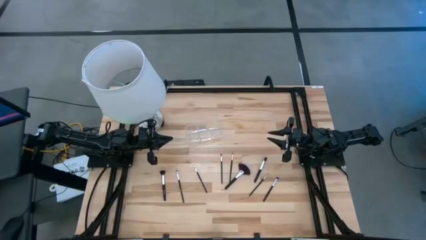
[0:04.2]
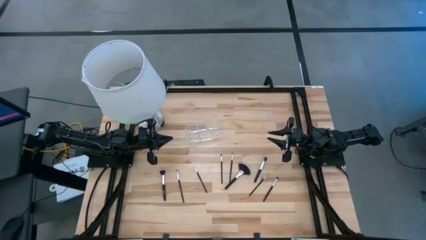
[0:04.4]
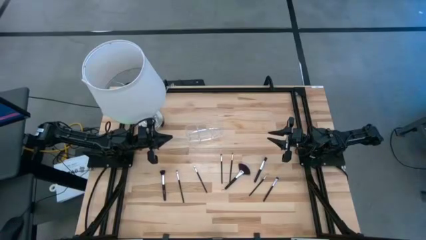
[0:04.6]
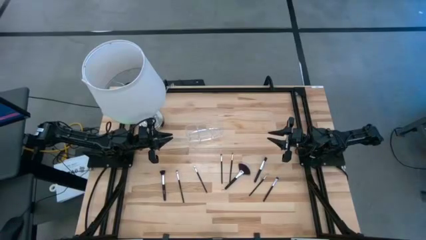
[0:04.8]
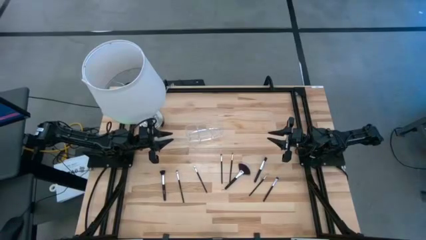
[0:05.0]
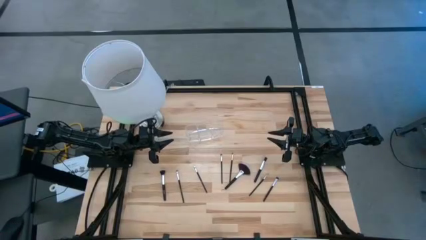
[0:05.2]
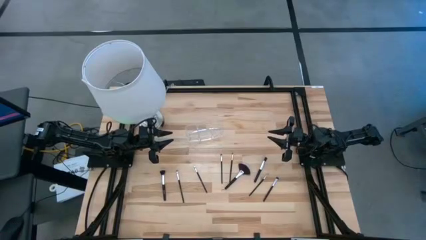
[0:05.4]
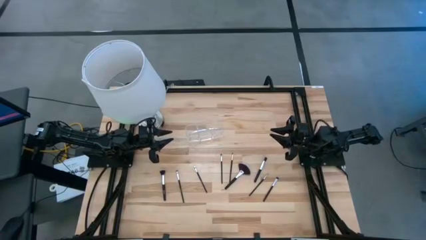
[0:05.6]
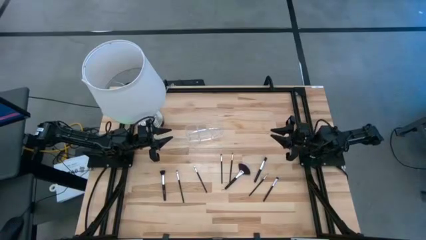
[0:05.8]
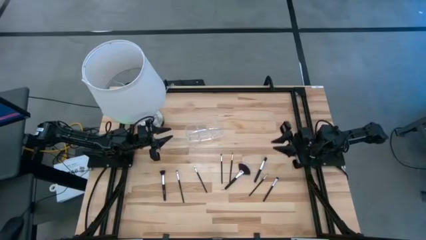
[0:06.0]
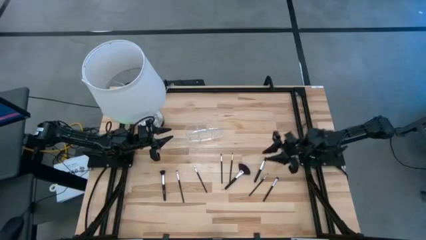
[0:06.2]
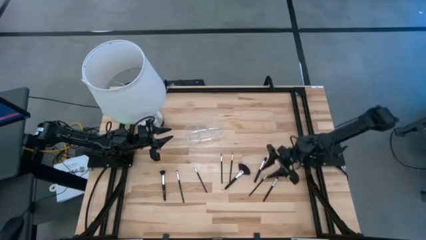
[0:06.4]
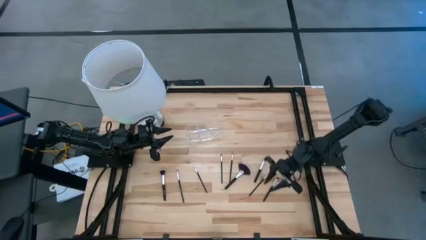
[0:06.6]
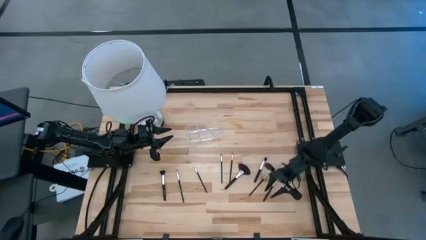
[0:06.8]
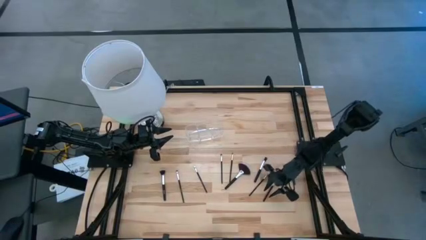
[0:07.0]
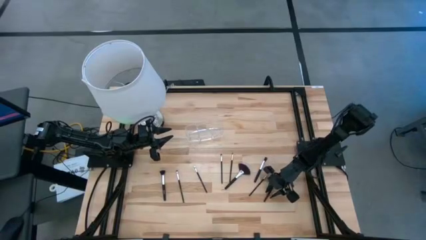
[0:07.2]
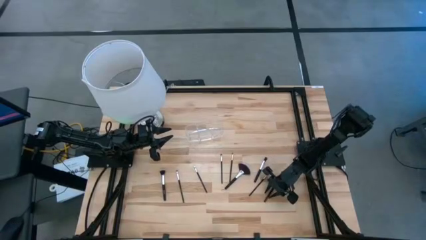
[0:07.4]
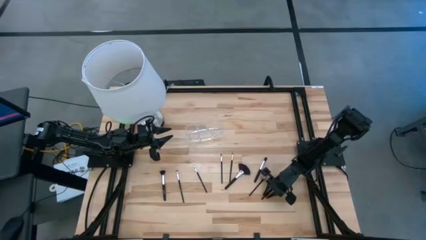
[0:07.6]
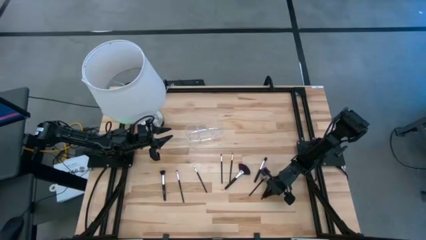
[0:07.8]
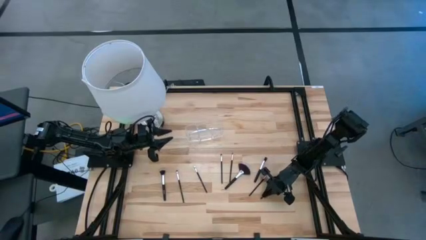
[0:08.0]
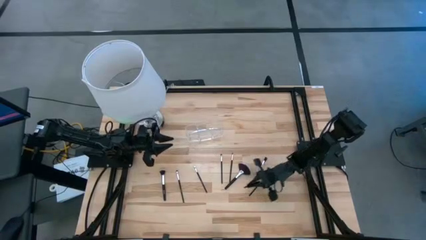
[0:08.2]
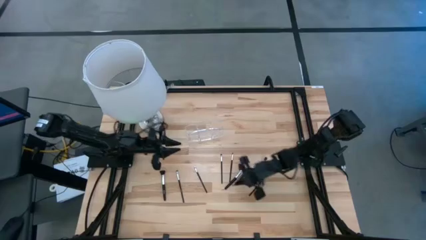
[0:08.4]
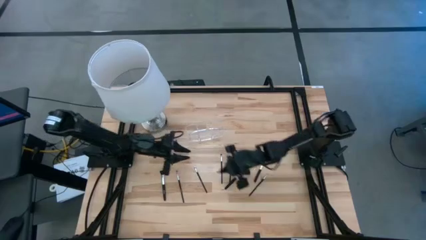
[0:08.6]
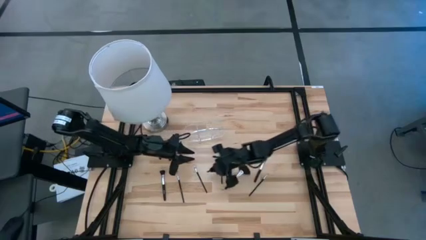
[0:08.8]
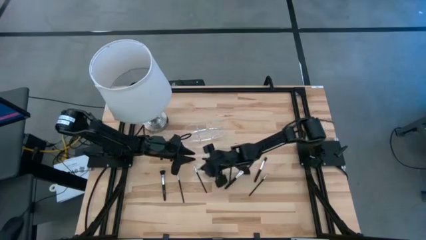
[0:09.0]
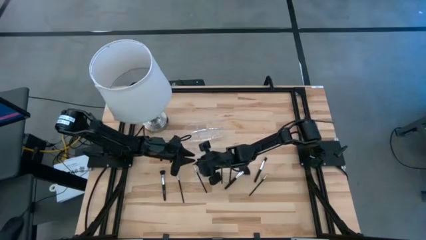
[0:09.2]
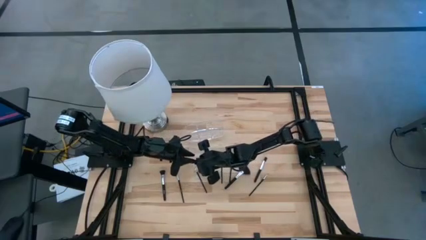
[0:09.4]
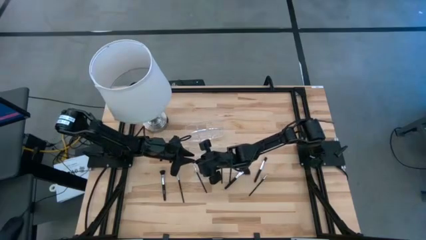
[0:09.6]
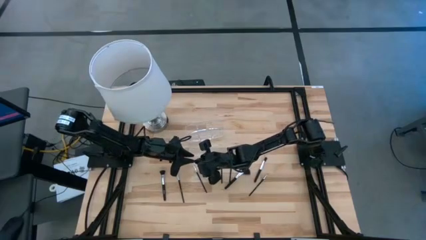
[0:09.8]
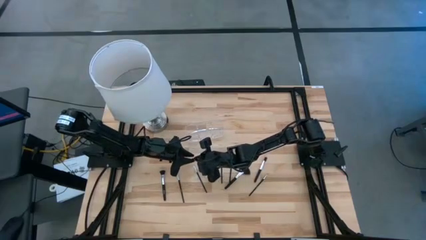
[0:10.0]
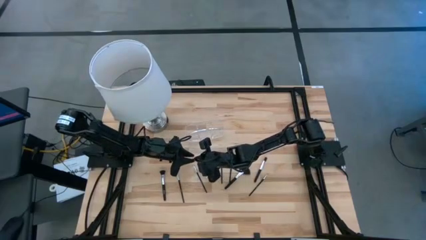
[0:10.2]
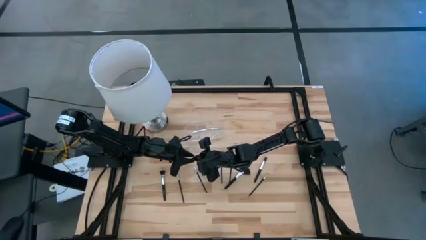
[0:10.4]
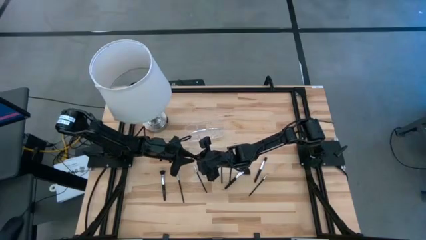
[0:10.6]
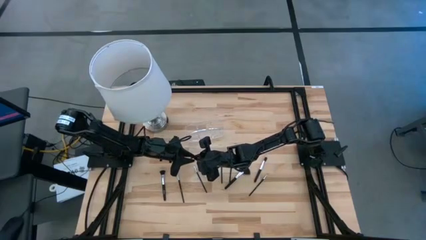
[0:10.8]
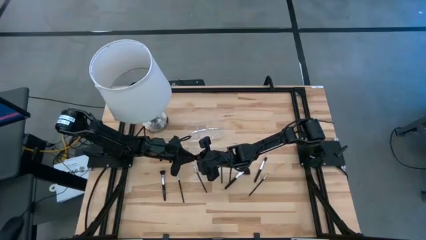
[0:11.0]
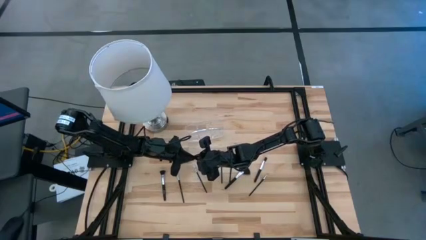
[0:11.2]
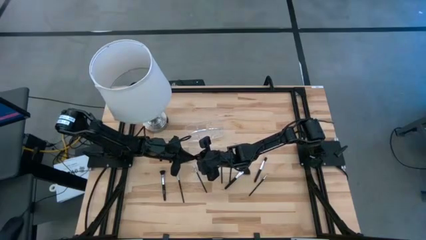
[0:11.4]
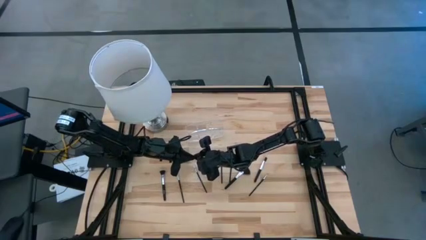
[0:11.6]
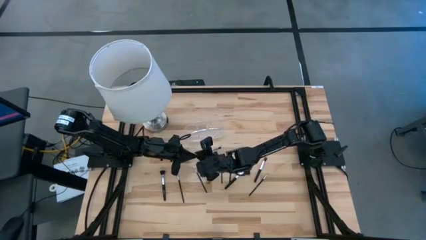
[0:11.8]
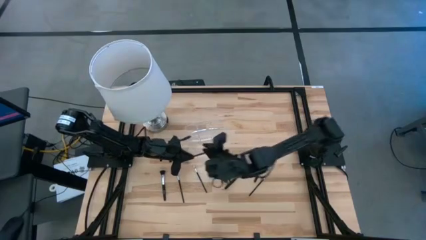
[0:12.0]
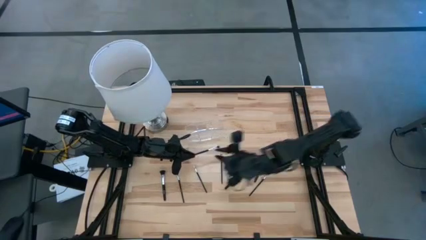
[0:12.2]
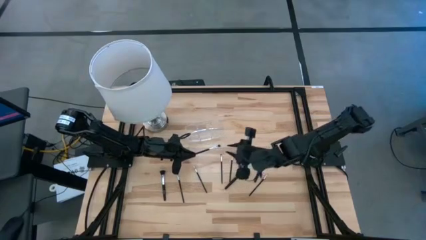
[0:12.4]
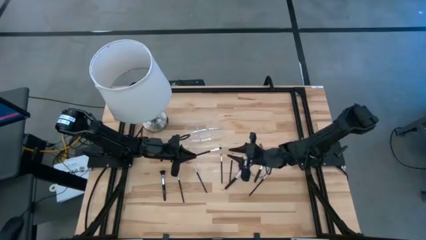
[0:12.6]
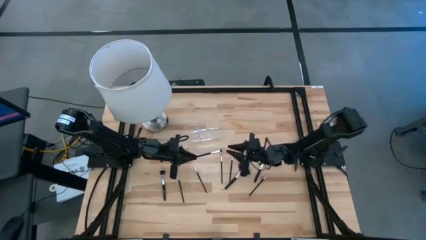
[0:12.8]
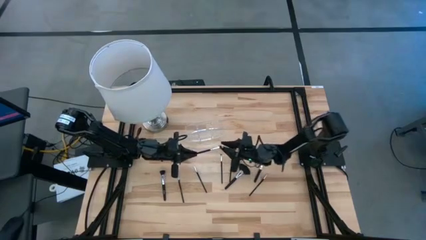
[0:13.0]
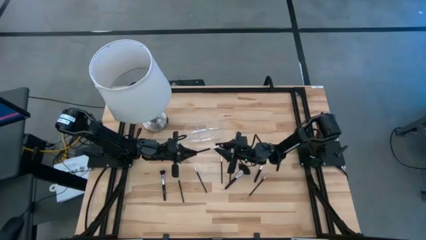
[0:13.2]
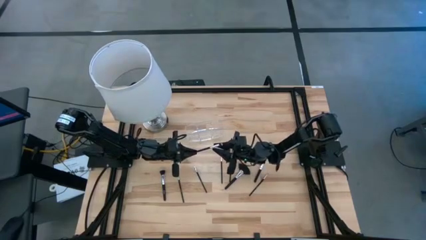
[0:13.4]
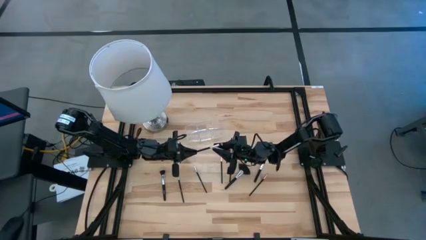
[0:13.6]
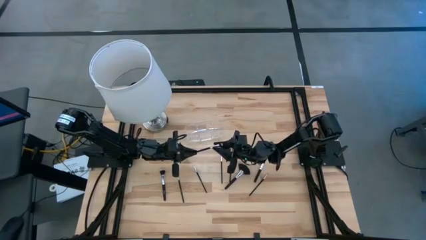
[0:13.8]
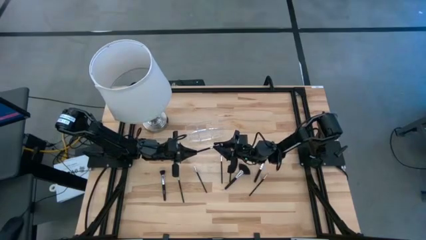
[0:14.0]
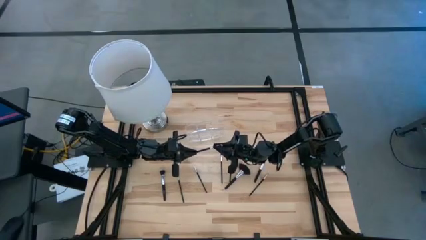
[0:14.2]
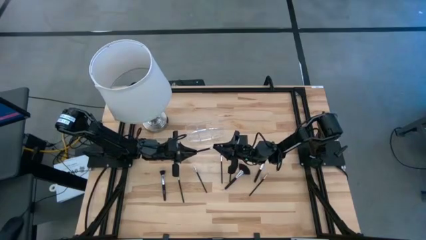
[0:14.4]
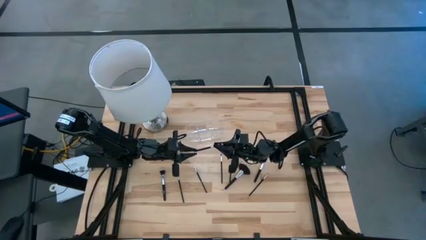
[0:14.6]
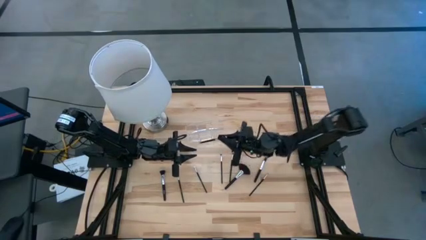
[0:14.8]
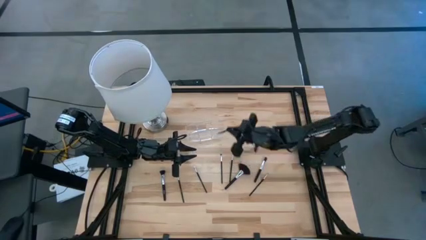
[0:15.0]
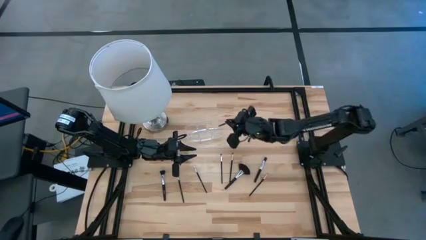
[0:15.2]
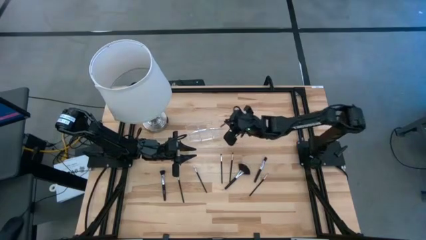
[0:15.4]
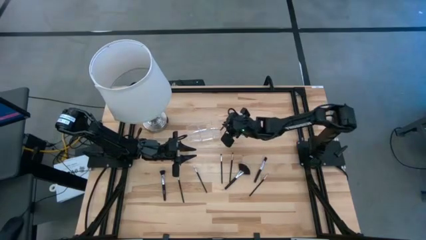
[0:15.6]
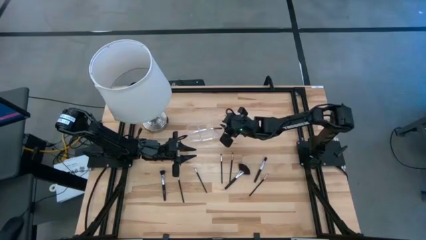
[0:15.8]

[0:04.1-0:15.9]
Task: Put items in baskets/containers
Put the right black foundation brush into the transparent organizer

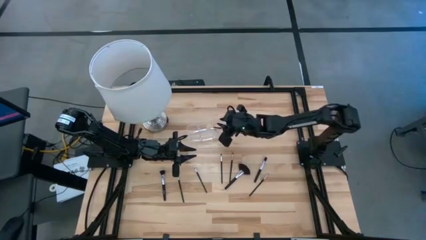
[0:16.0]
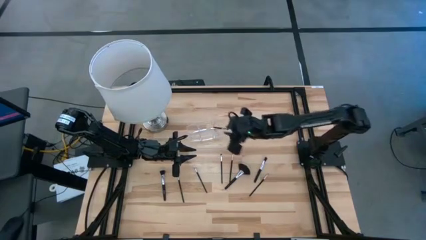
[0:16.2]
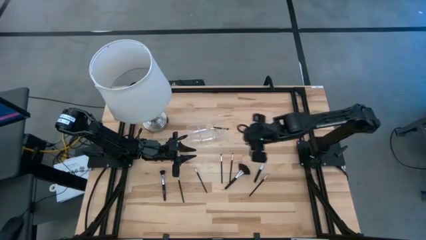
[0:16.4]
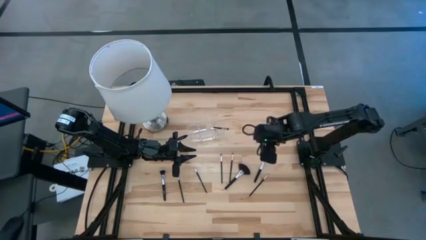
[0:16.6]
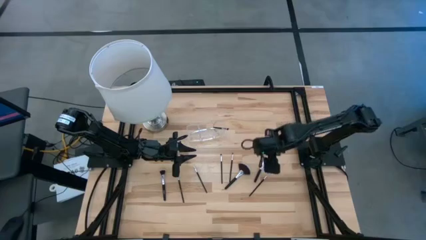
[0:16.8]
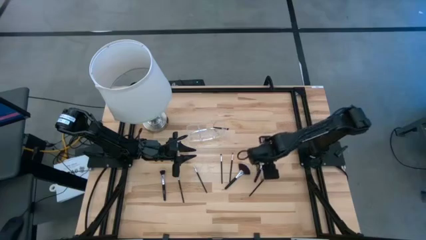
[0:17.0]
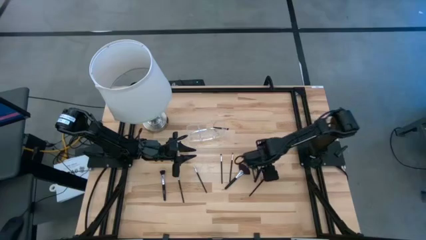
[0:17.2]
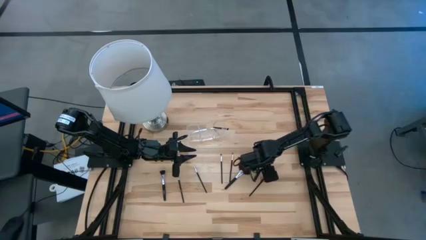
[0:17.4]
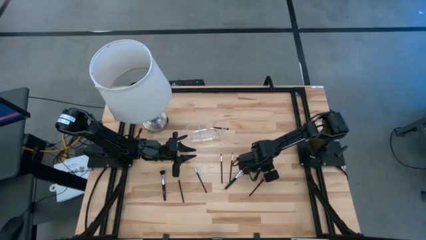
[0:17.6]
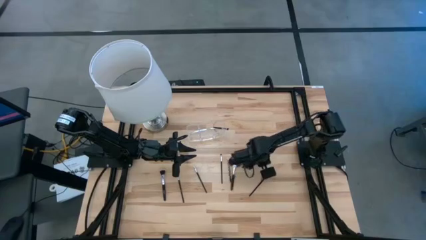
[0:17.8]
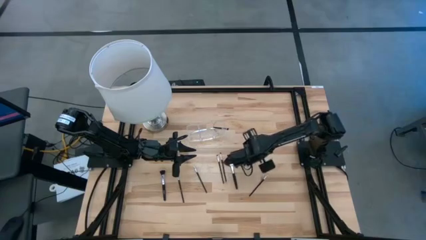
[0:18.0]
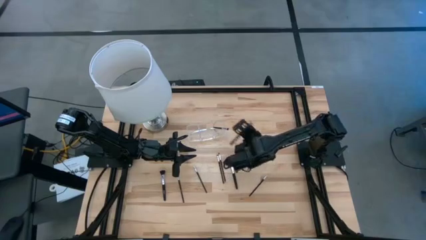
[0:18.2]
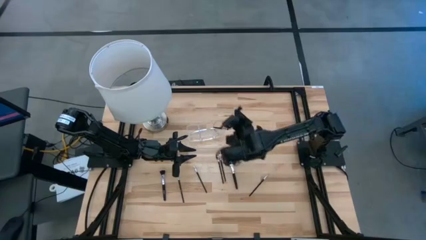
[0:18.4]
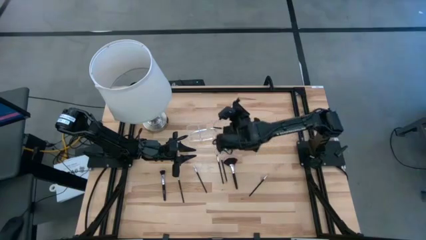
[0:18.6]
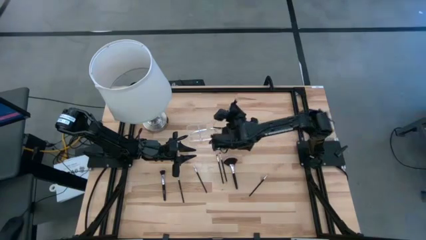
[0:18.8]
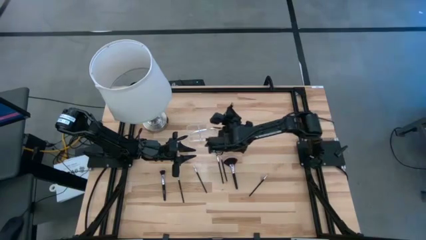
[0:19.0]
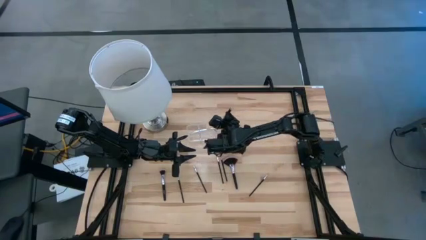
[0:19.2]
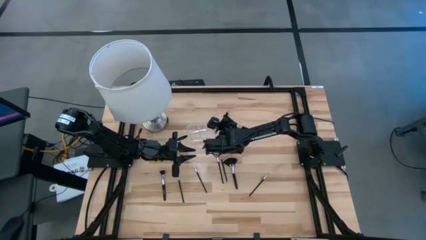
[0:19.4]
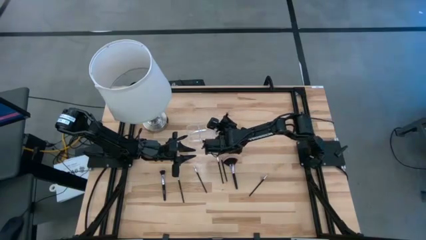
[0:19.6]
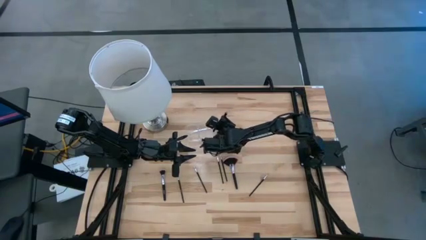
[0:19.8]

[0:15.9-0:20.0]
Put the black blush brush into the transparent organizer
